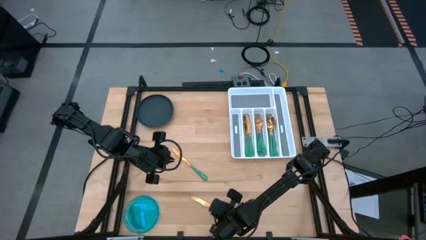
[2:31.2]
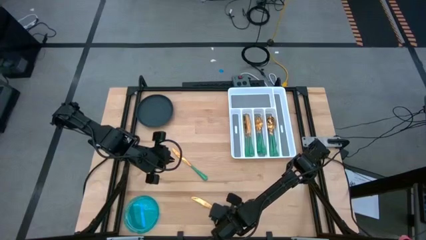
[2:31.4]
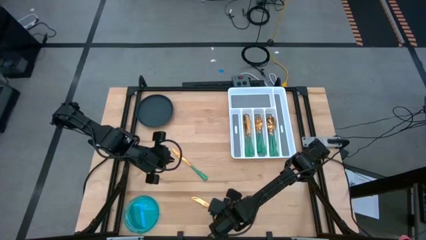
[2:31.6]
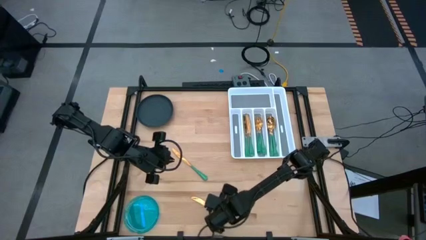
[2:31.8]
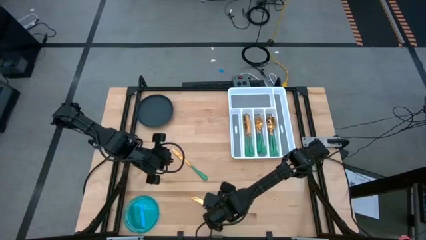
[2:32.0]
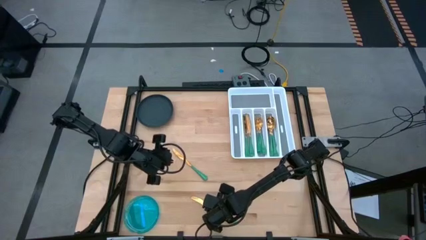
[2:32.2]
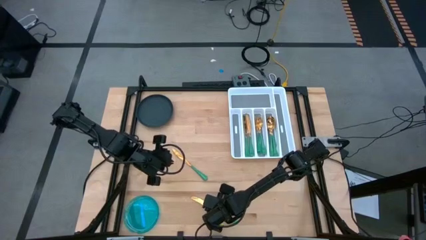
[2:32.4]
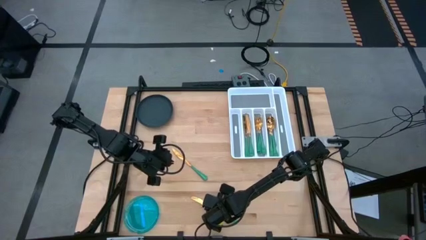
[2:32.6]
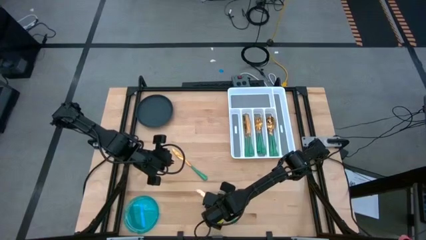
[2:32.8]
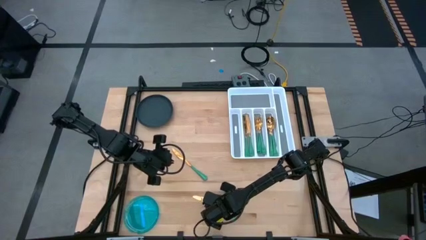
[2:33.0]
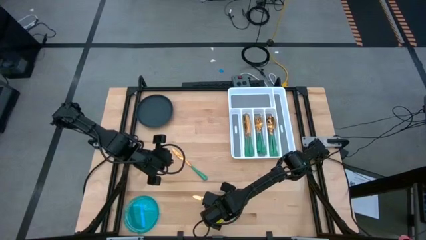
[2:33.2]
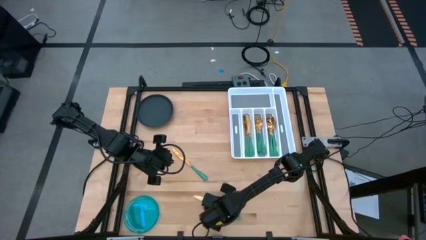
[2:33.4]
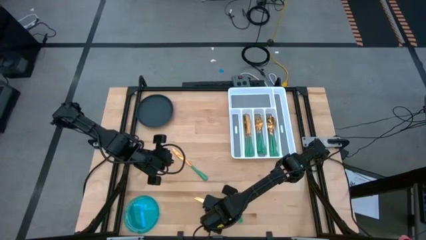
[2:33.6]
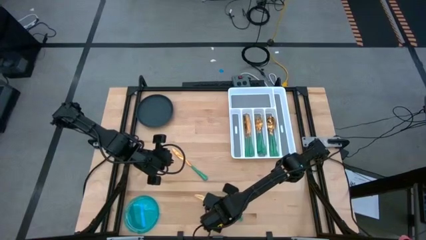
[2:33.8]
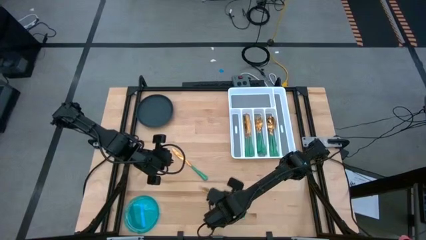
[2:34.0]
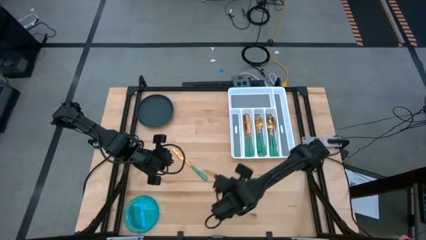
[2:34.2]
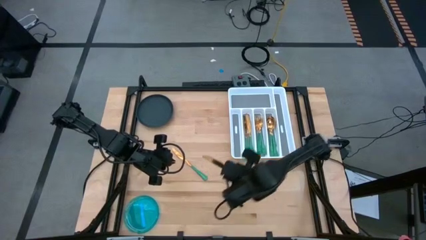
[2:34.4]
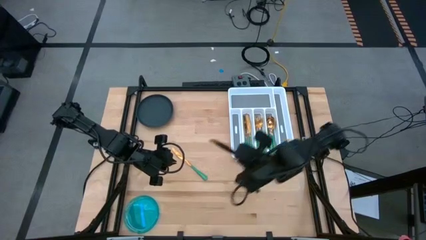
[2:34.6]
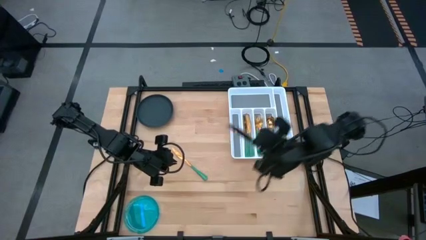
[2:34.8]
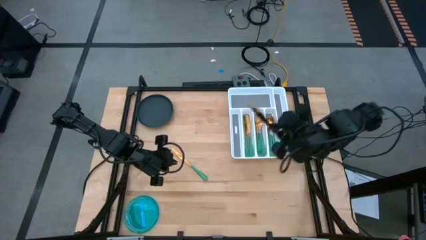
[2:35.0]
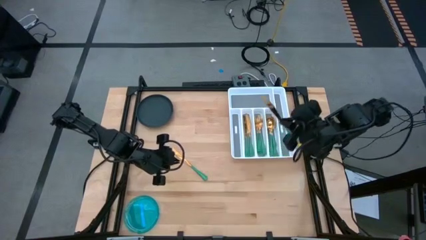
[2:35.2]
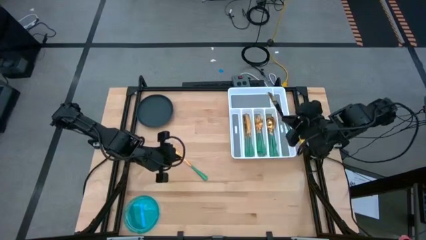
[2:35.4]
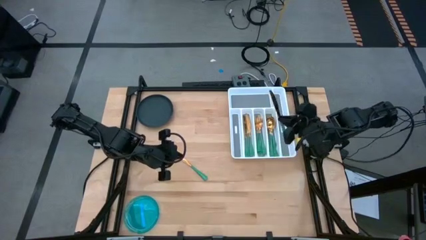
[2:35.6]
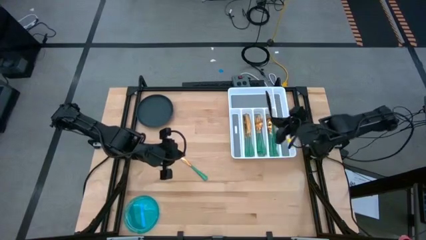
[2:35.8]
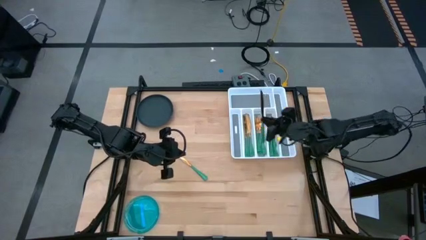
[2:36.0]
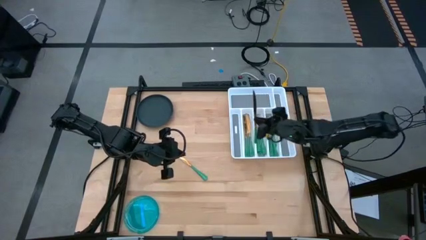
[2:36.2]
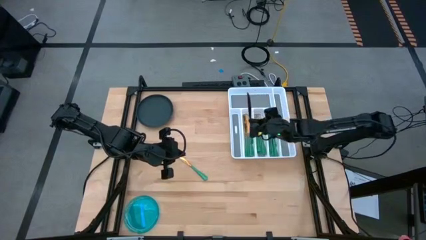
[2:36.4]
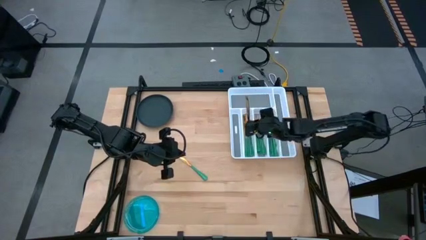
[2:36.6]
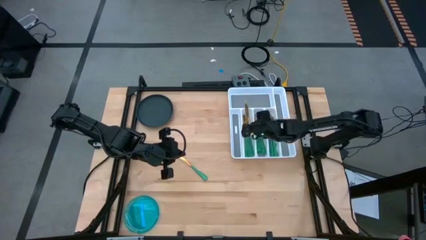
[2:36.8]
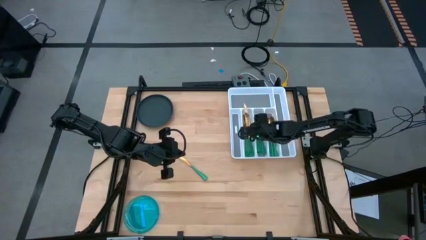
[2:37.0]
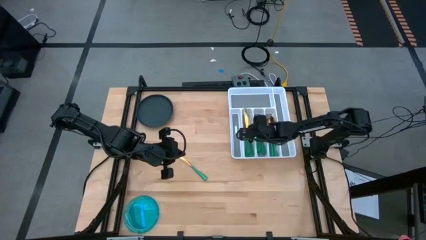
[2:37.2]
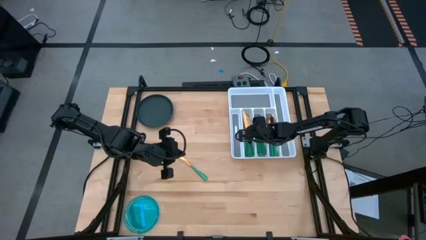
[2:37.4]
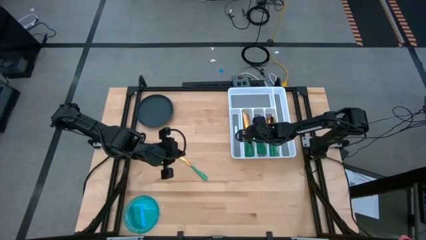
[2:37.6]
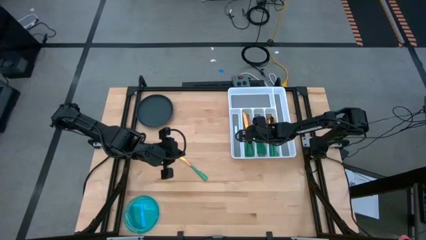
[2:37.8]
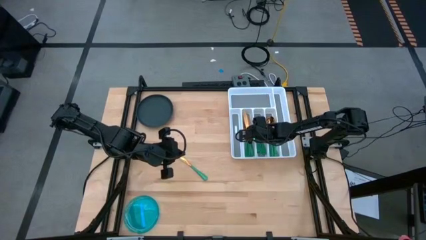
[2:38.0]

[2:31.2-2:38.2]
Task: Sort silverware
Put the green knife into the white silverware organizer

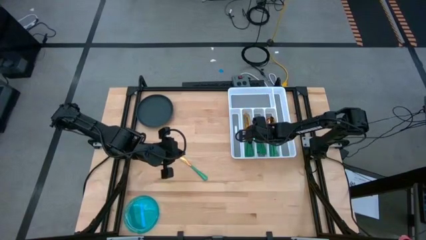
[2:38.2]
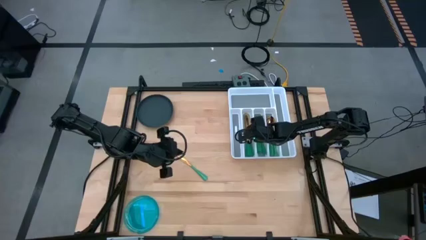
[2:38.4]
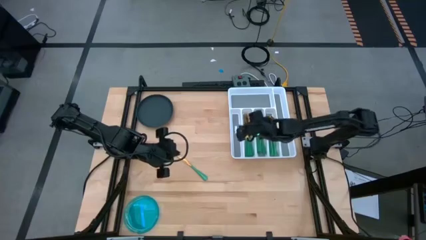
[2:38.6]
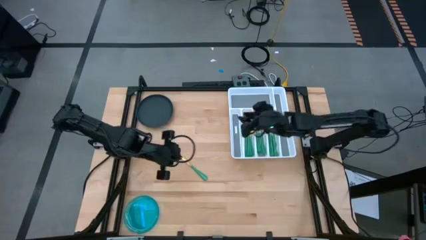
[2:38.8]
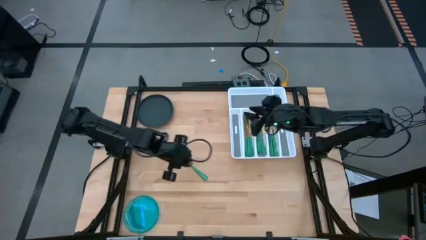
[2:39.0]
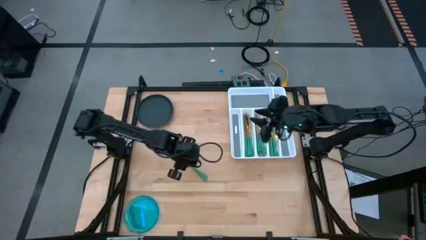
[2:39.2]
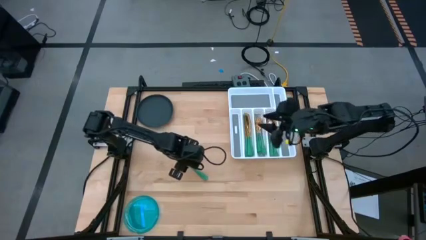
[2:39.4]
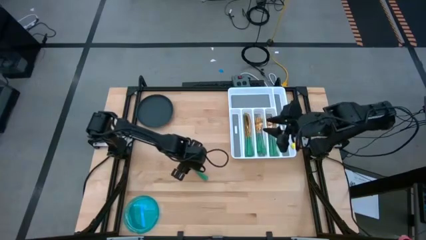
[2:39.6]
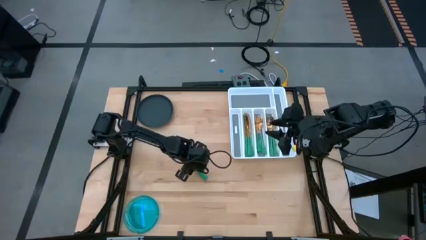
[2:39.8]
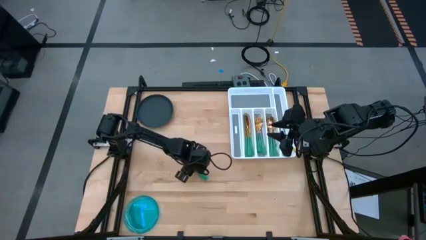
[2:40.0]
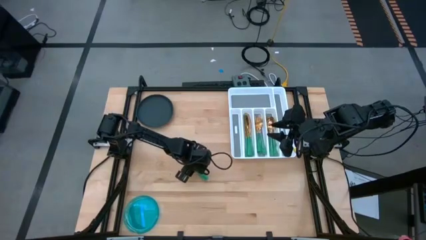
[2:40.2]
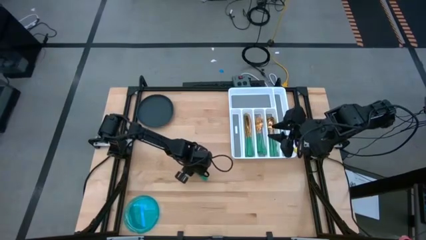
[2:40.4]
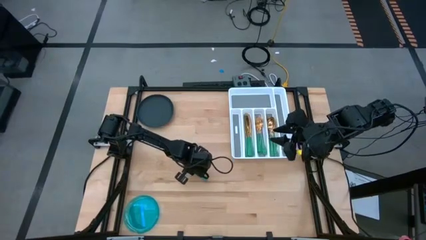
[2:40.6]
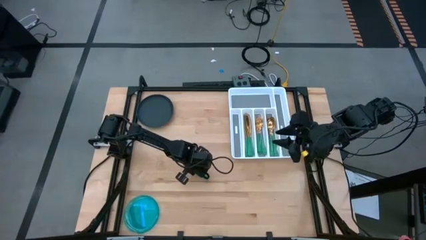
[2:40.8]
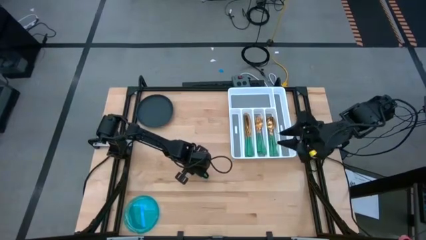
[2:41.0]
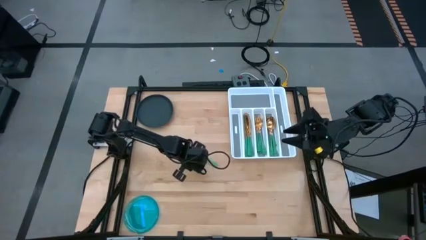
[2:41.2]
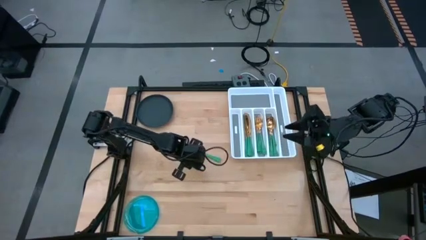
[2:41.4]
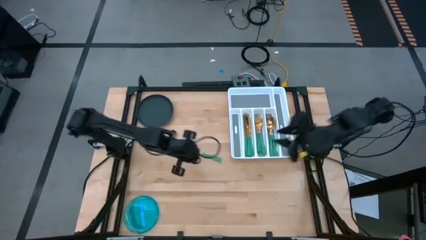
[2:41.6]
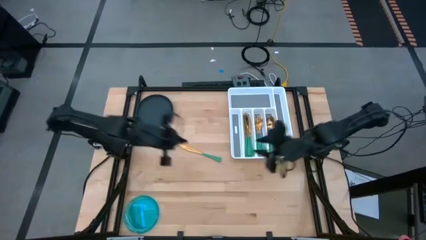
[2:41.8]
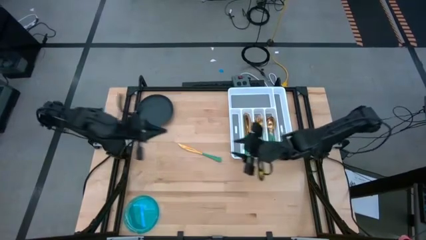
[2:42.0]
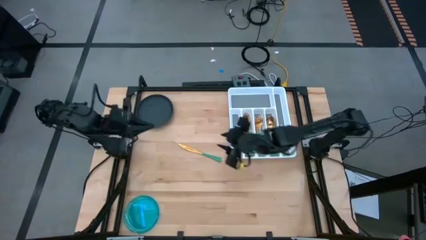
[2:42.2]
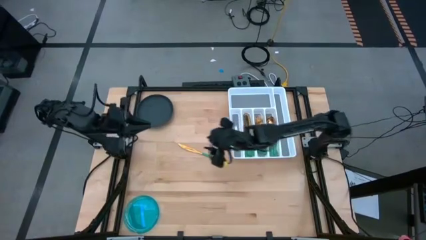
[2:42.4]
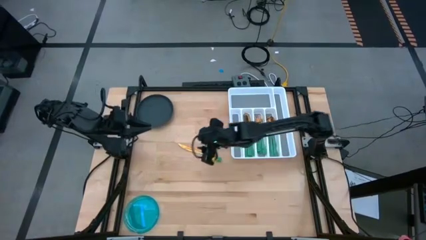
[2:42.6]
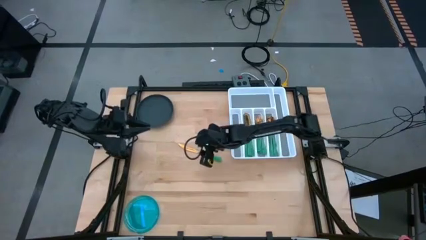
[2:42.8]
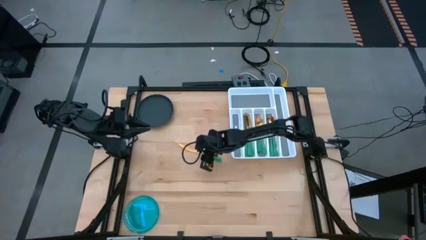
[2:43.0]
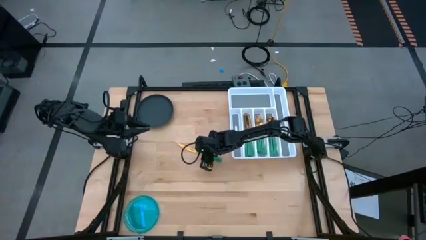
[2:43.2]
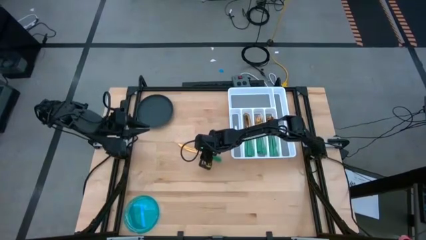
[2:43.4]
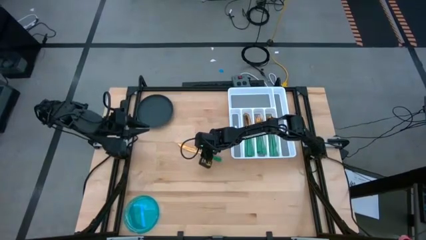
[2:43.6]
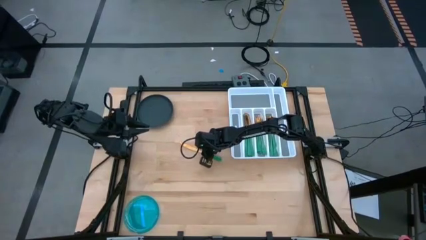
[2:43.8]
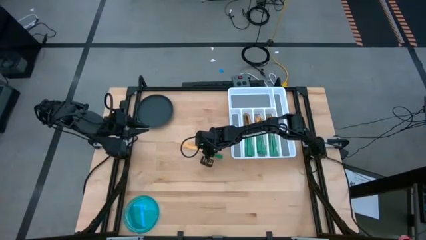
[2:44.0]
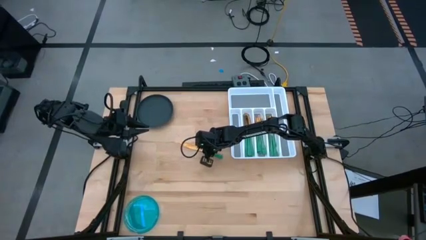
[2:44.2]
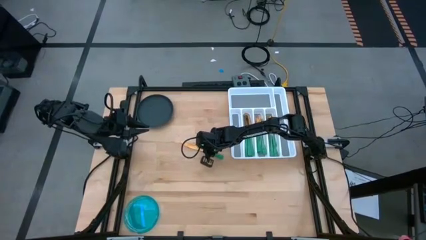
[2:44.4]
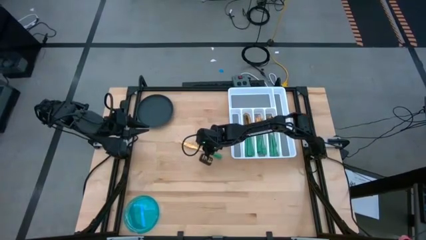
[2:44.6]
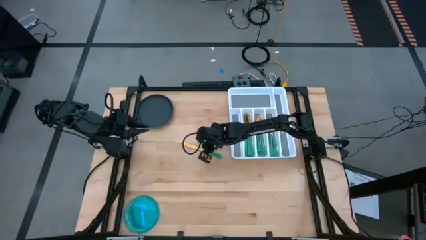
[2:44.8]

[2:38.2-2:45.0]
Put the green knife into the white silverware organizer

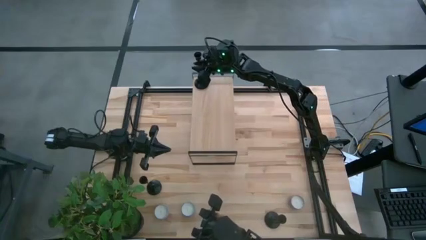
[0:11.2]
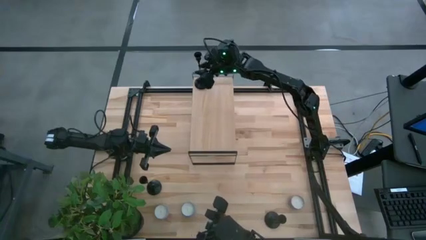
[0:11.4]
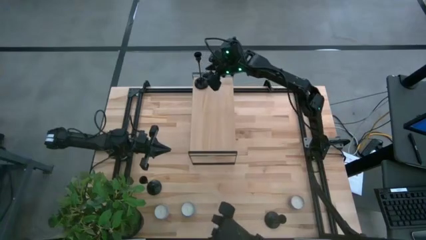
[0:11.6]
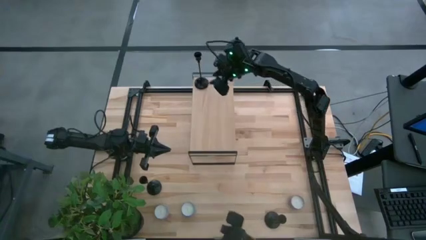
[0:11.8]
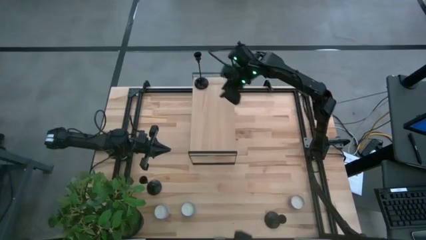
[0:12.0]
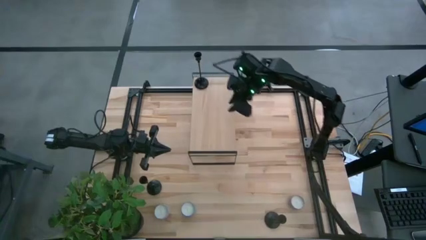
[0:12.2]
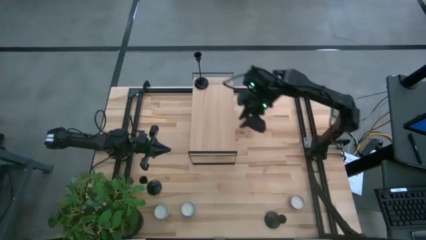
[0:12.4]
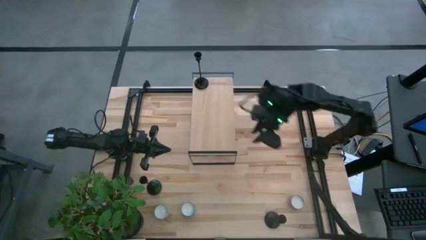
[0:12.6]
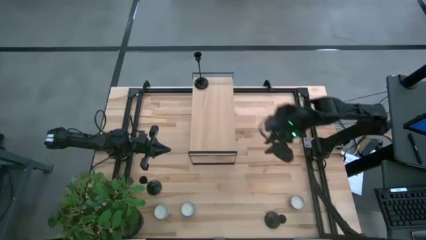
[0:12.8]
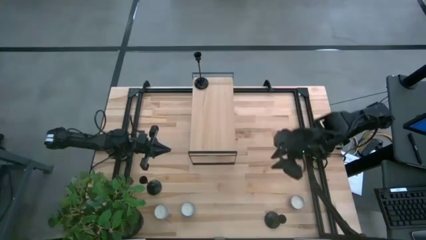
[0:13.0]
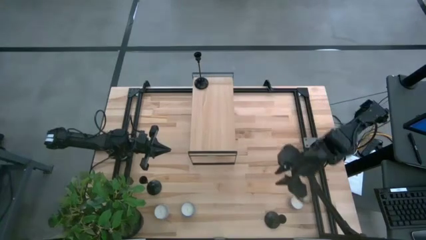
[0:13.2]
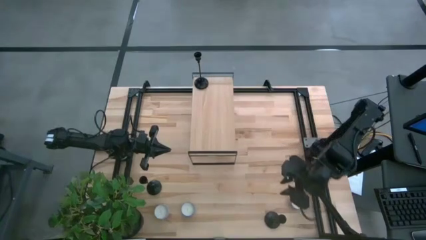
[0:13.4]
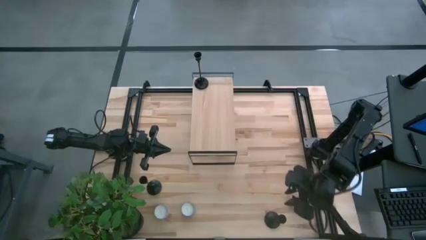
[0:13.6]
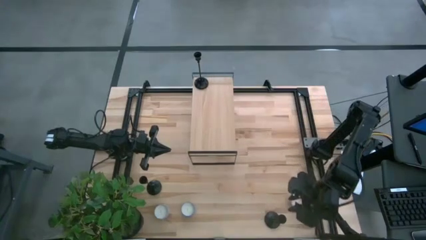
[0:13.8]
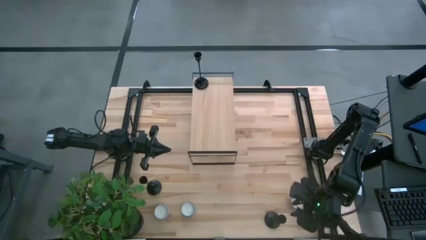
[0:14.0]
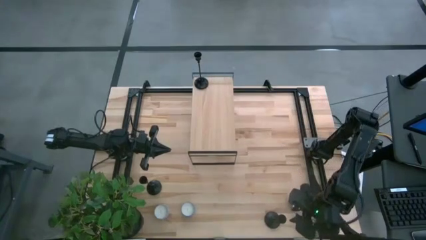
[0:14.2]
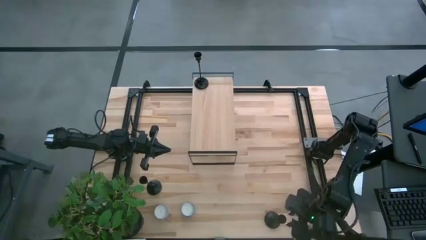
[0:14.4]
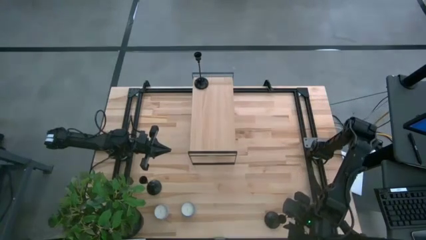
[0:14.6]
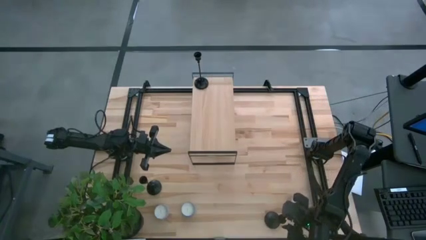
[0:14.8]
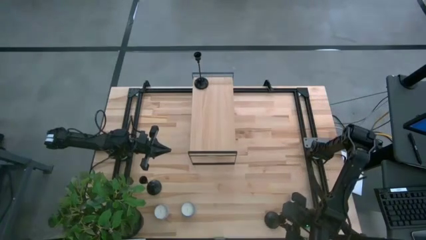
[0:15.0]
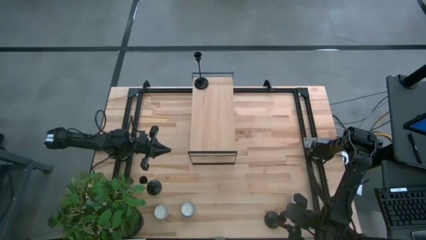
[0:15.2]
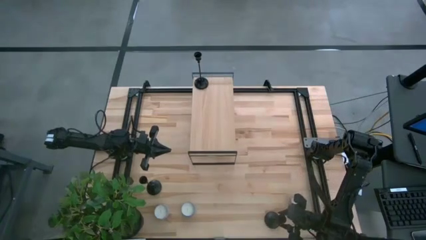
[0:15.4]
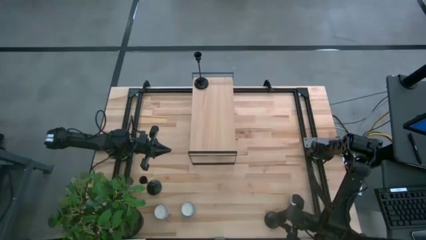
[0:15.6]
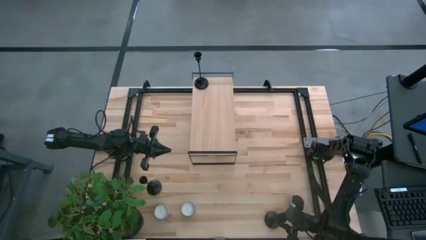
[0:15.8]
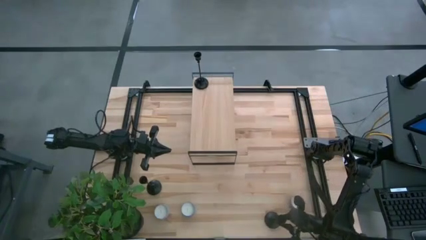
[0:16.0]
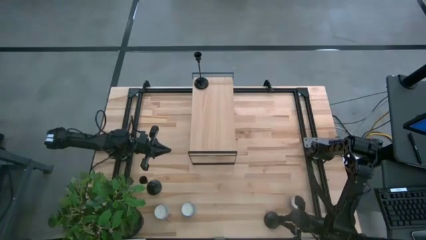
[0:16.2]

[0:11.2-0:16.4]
Task: Pick & Place candle stick holders
Align the right black candle holder with the other black candle holder on the shelf
